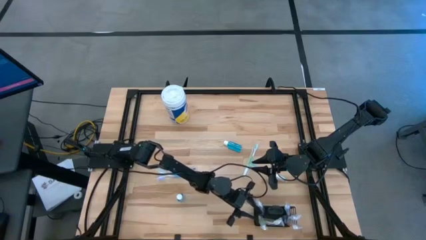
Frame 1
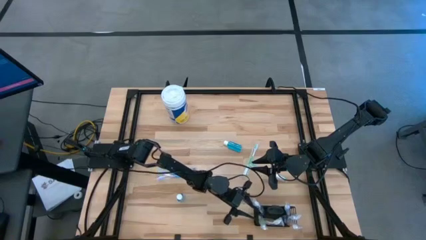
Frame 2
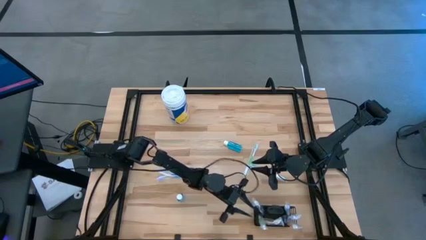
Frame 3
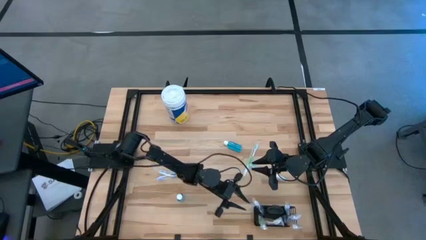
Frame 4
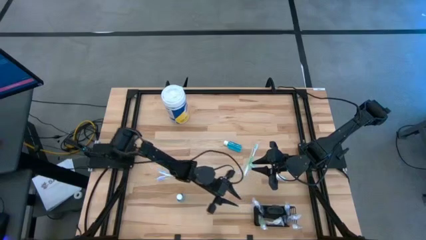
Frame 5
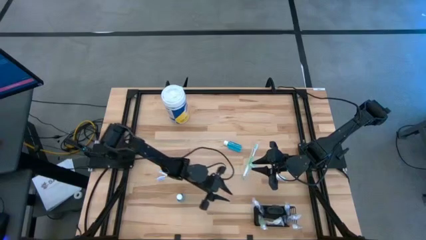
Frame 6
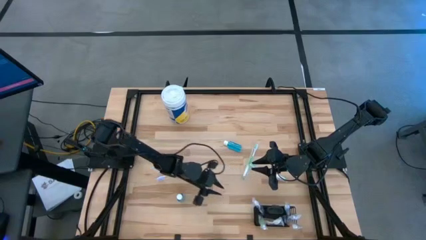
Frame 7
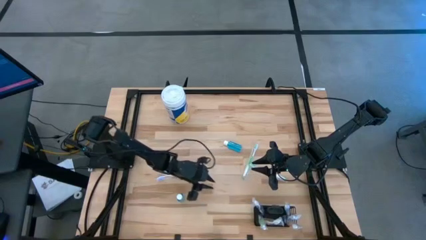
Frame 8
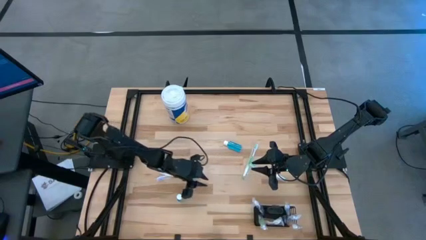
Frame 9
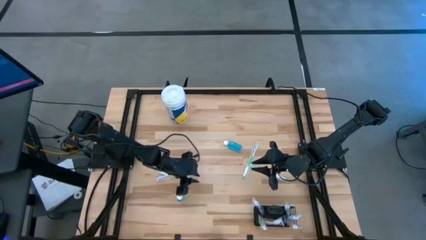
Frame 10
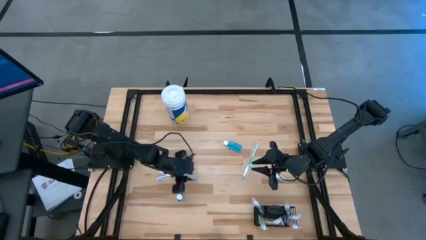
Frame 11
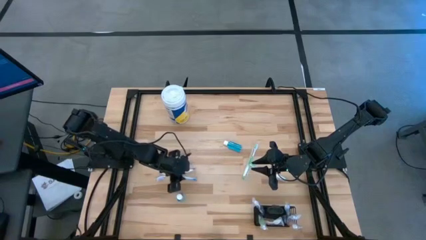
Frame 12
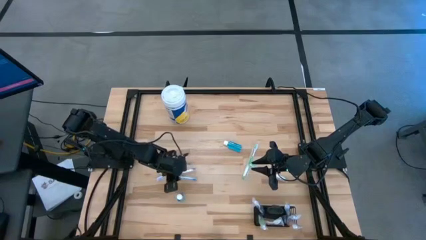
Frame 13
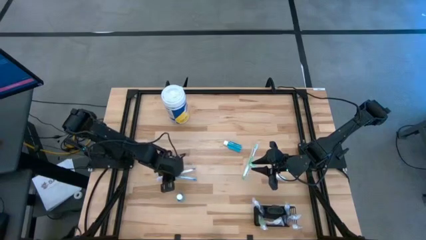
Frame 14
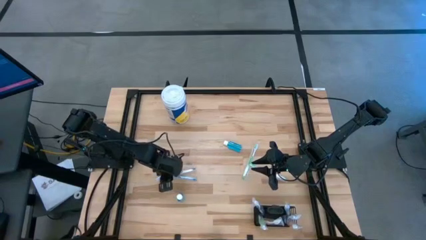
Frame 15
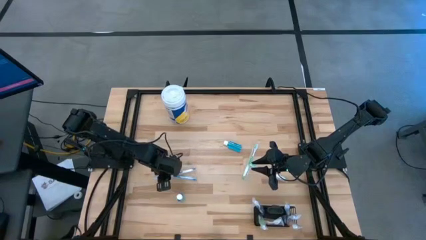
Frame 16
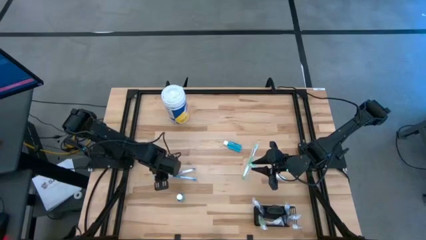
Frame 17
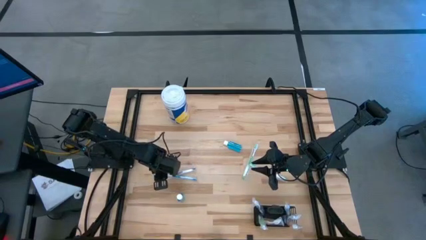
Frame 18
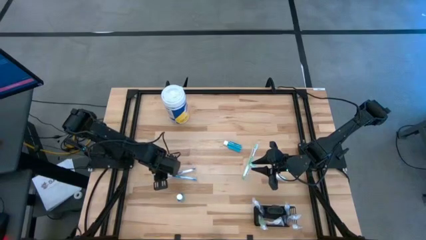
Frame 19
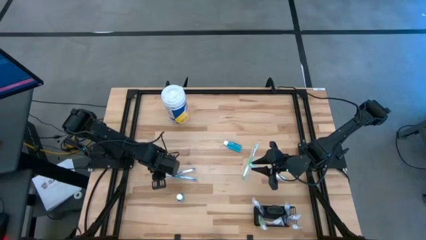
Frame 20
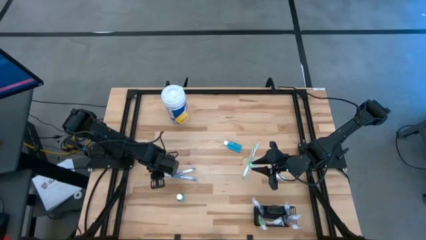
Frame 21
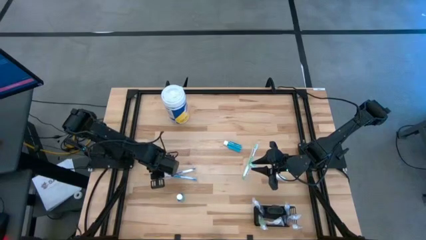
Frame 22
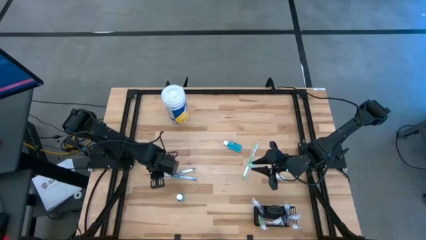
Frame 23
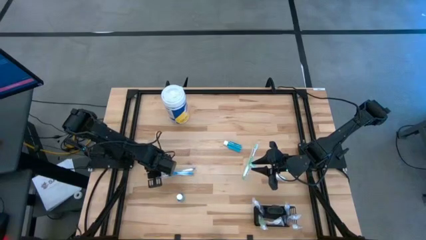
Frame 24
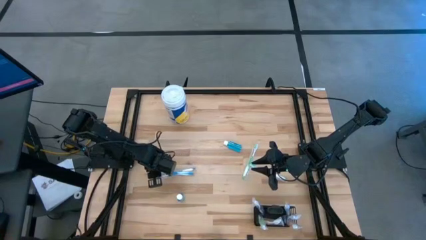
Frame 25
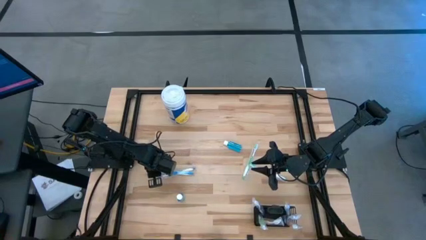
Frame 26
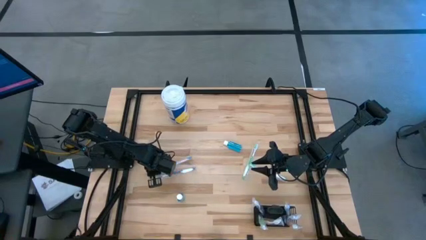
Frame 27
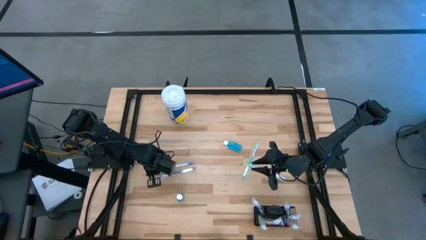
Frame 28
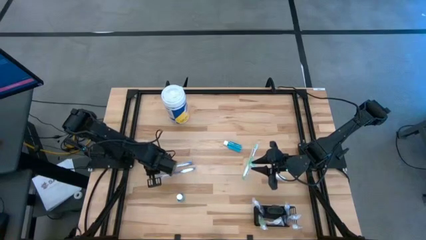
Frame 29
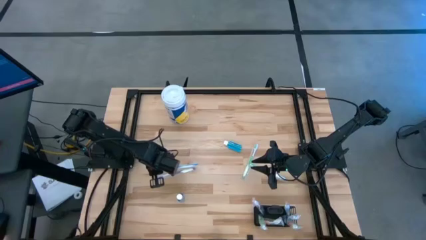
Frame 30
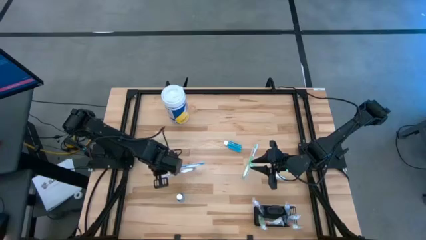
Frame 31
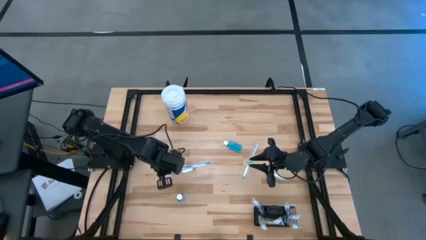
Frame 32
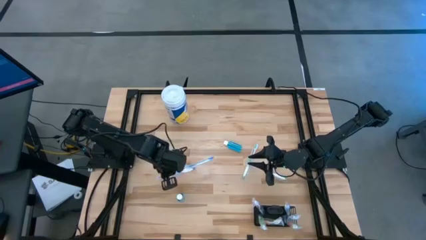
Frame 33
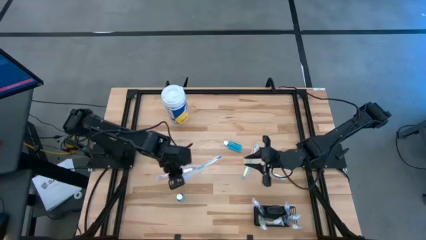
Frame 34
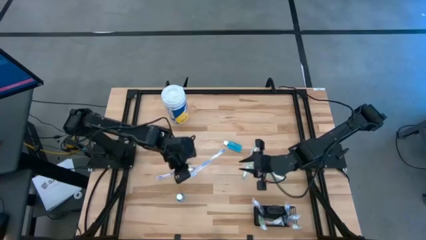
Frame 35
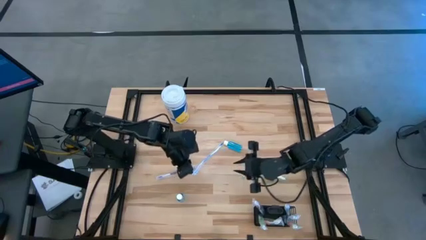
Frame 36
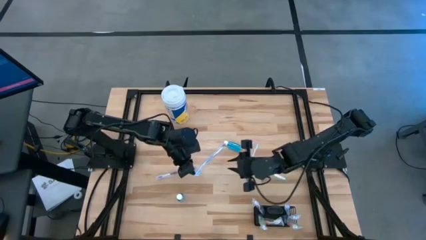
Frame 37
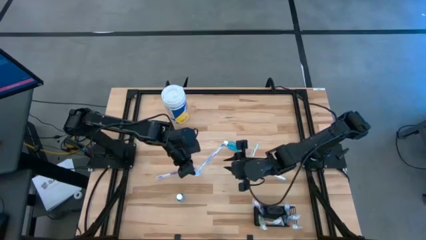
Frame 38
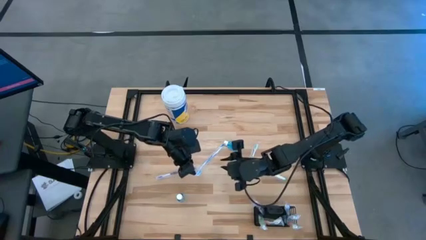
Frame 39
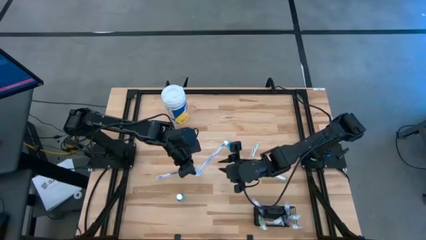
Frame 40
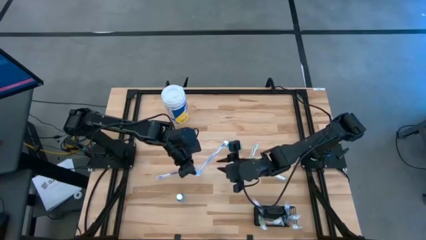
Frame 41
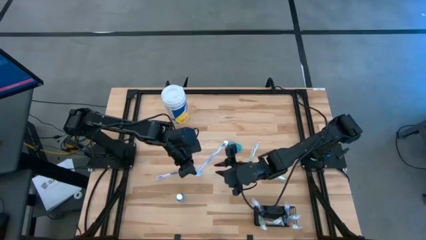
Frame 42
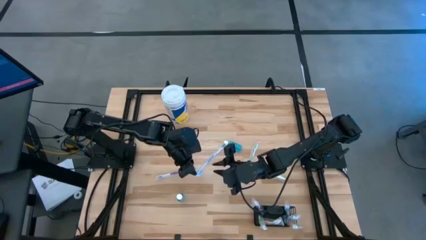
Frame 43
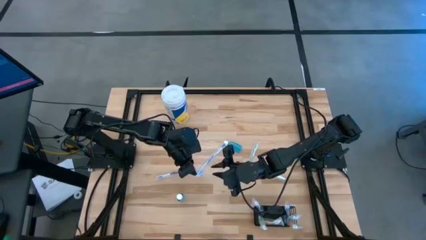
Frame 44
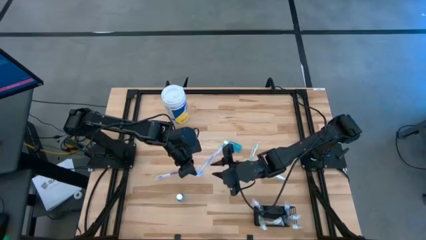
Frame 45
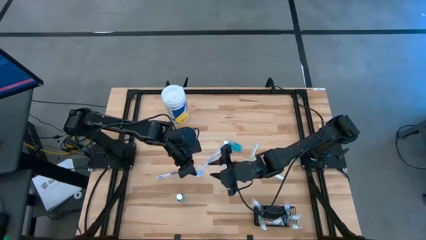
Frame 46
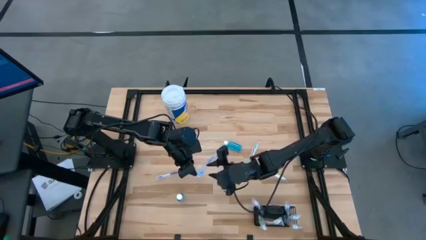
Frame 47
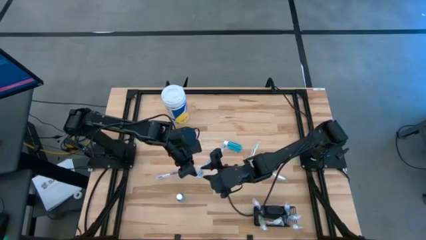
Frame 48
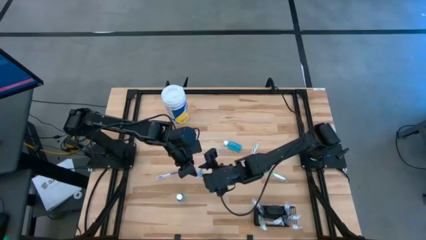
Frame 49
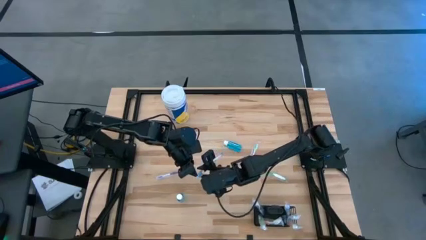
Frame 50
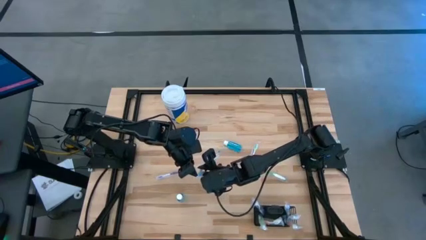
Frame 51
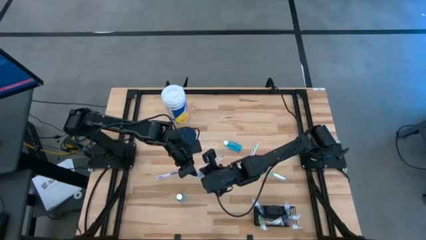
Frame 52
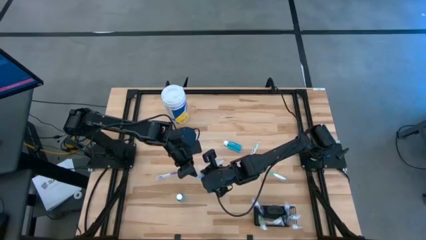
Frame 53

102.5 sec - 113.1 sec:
Task: Pick & Place toothbrushing station
Put the blue toothbrush into the wire organizer

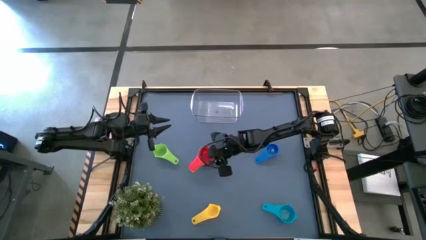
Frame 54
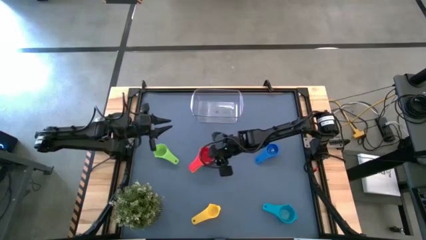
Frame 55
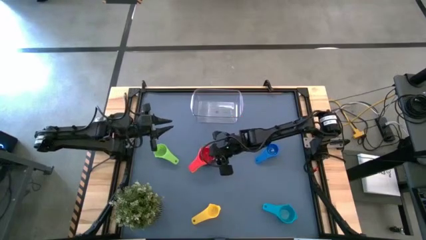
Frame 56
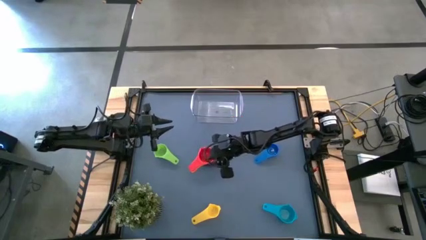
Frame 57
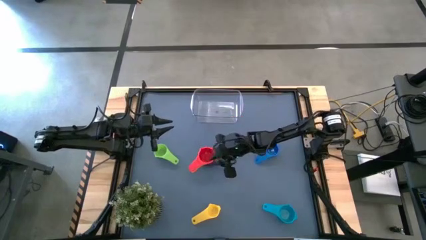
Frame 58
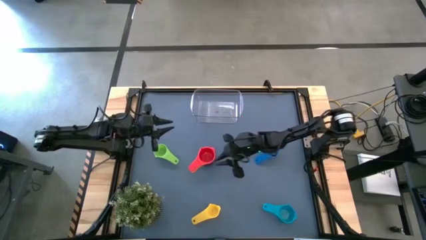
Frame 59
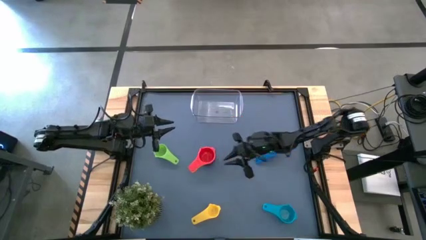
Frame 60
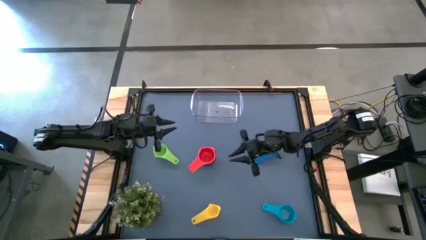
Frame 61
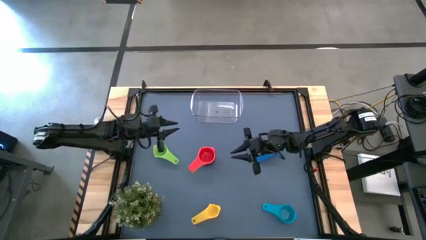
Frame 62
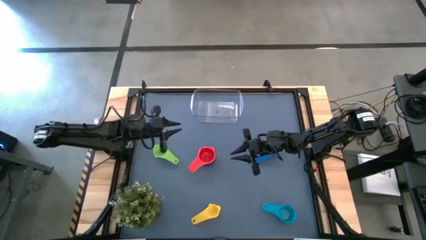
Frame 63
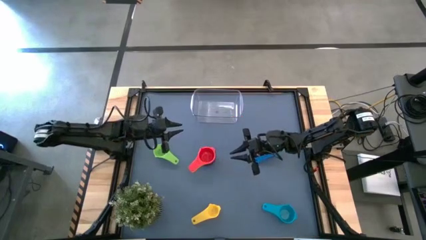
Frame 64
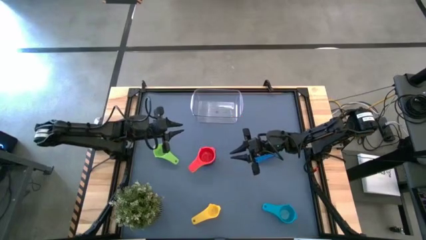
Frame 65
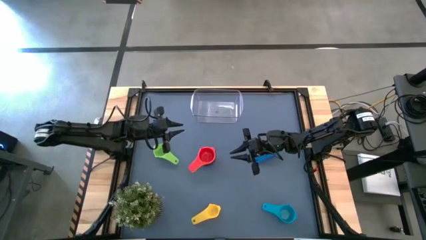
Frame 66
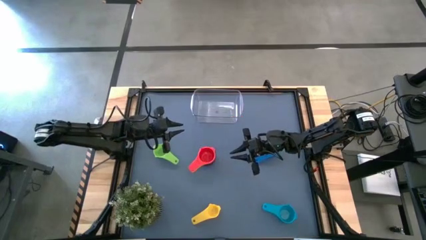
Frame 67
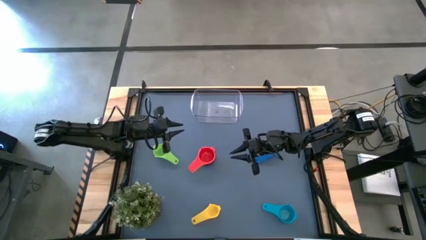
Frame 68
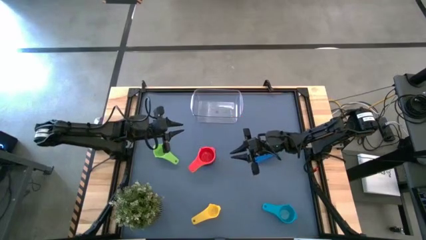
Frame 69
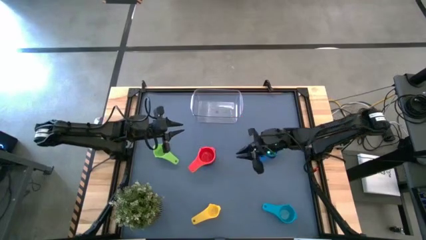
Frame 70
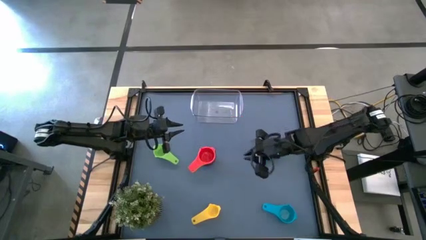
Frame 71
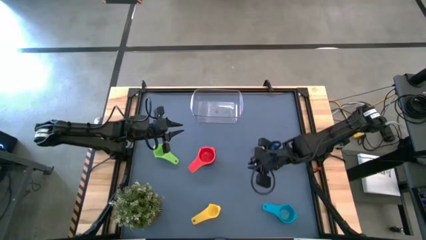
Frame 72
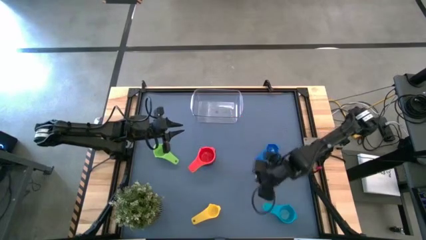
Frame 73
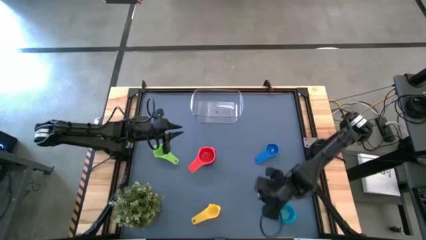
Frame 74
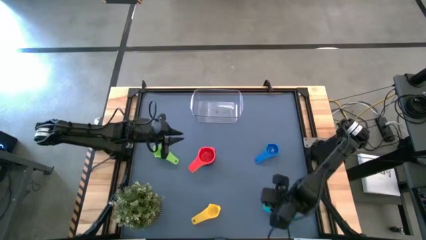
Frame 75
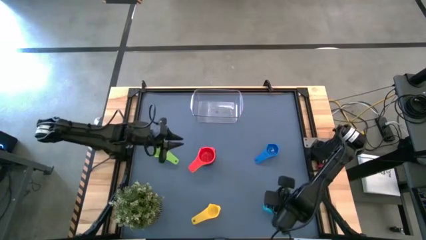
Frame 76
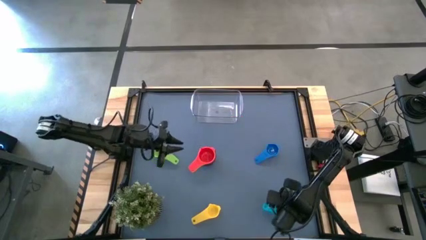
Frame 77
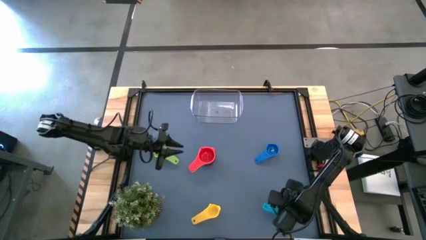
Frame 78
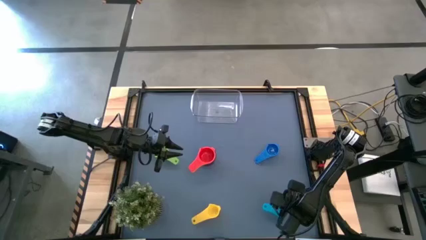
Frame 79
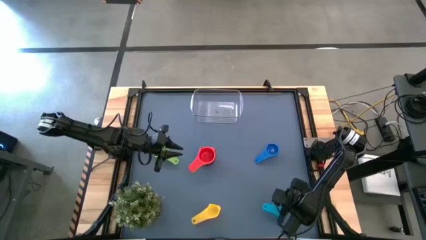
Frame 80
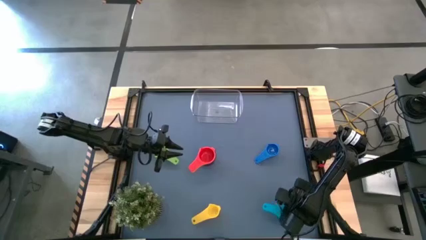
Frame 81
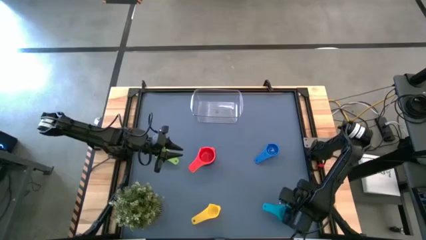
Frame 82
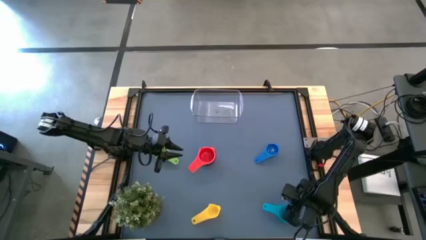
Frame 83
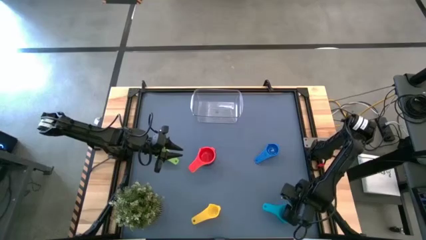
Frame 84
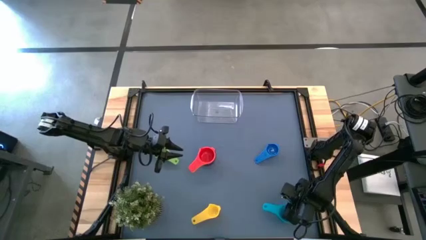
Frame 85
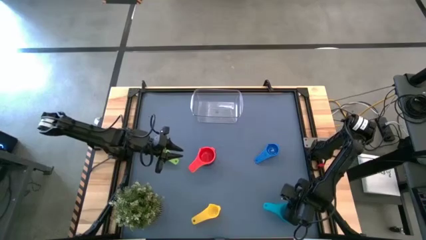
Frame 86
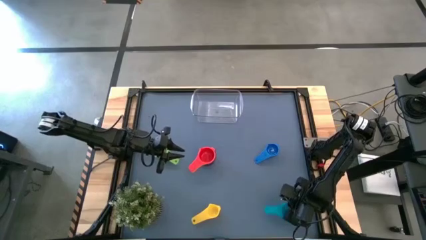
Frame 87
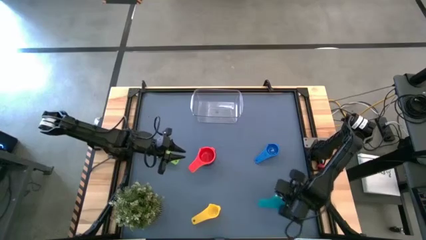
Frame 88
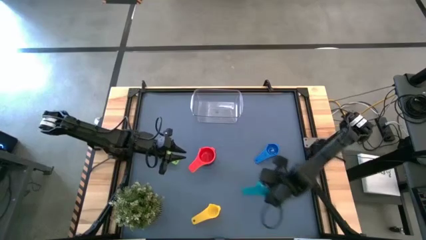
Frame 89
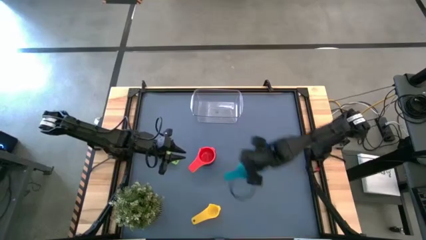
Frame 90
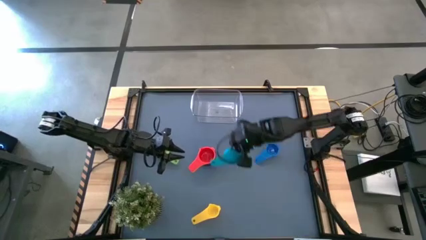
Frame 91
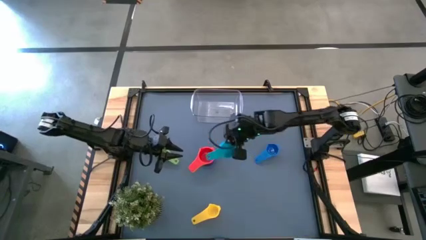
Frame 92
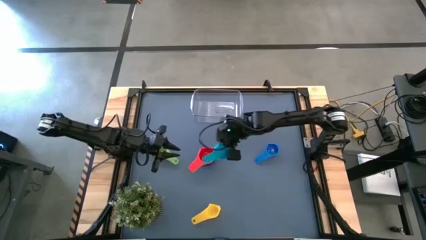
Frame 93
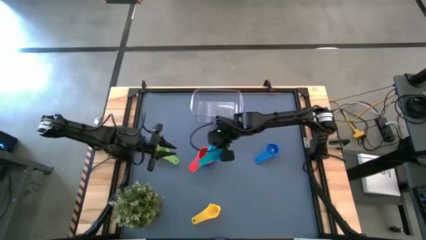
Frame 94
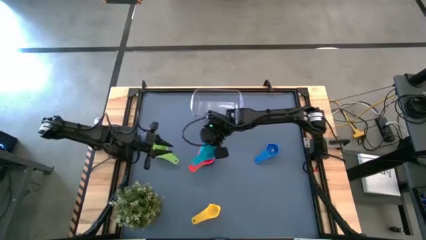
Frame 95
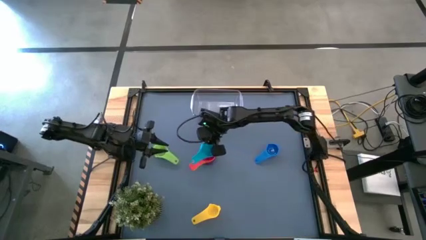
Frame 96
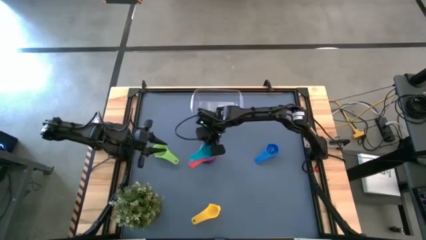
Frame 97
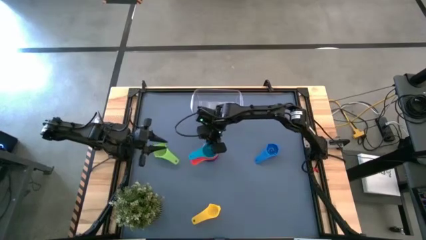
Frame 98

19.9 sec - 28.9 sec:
Task: Nest measuring cups in basket
Stack the light blue measuring cup on top of the red measuring cup
